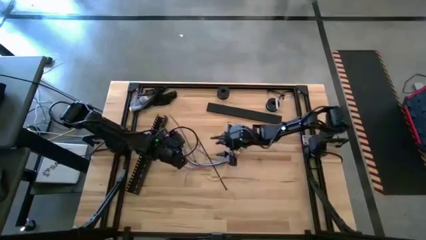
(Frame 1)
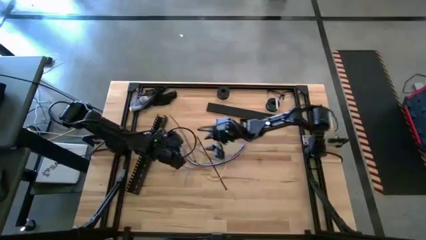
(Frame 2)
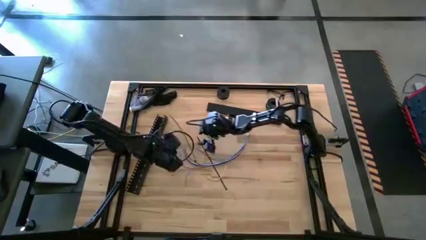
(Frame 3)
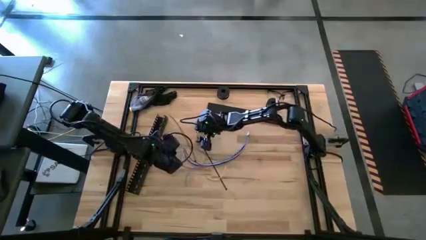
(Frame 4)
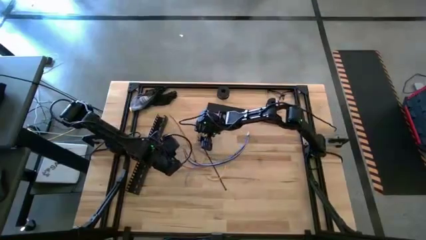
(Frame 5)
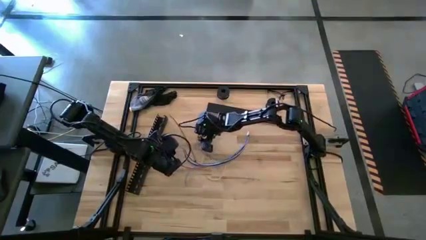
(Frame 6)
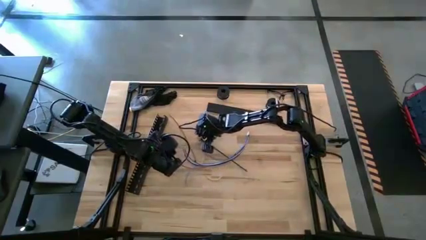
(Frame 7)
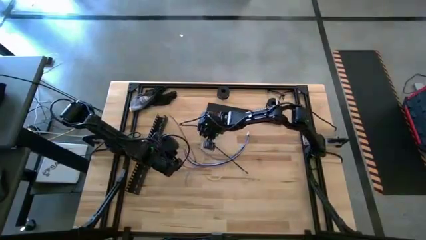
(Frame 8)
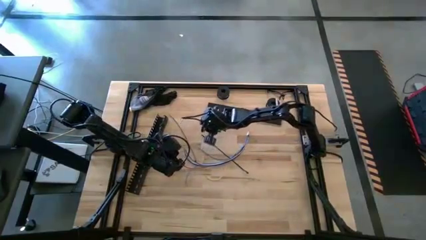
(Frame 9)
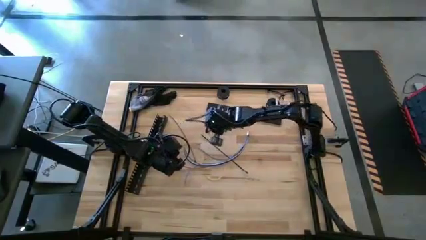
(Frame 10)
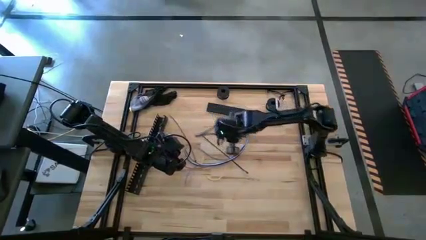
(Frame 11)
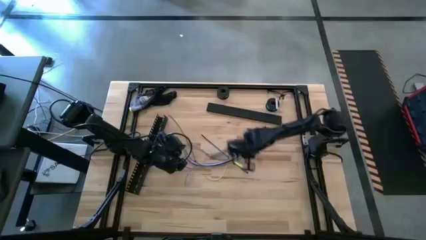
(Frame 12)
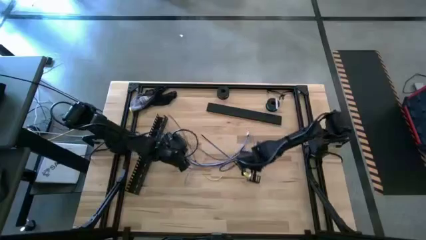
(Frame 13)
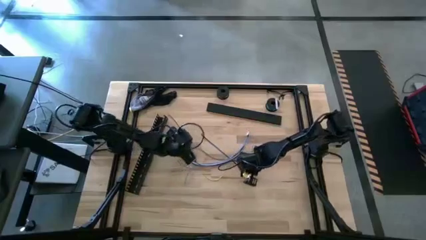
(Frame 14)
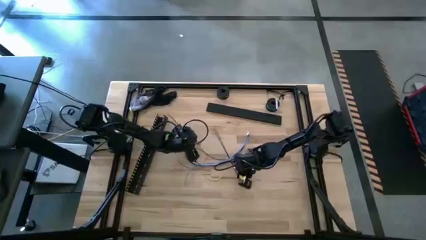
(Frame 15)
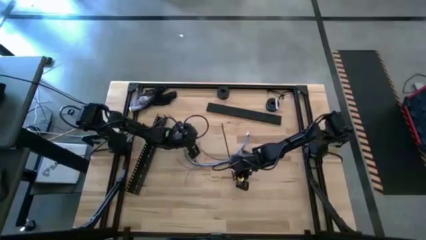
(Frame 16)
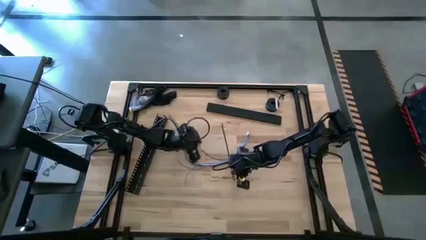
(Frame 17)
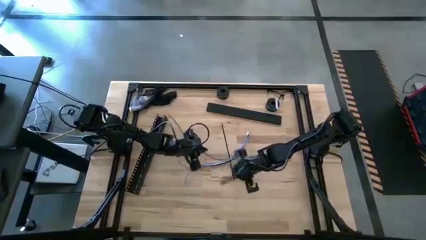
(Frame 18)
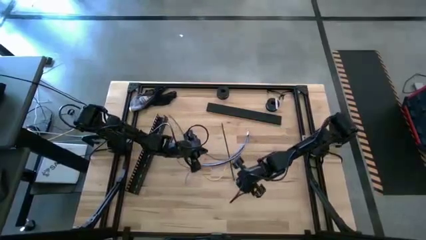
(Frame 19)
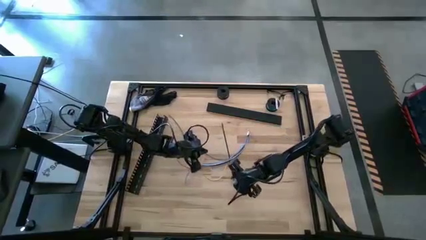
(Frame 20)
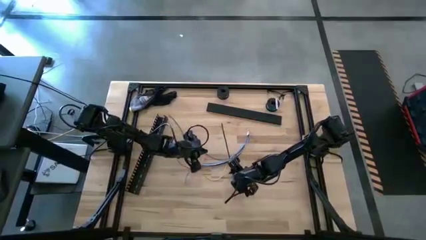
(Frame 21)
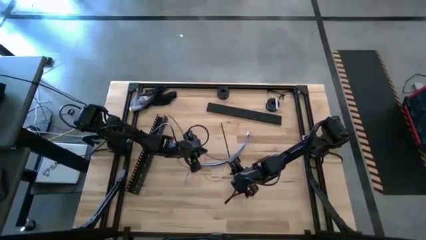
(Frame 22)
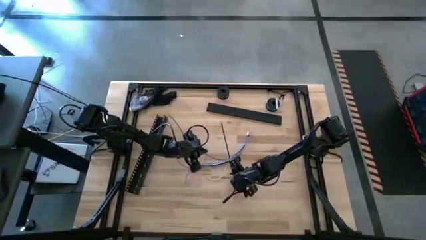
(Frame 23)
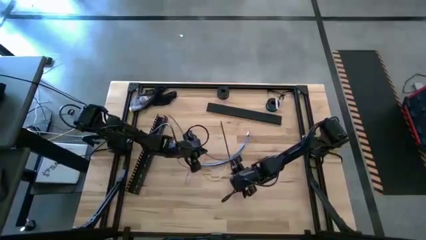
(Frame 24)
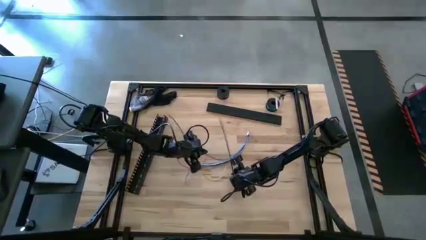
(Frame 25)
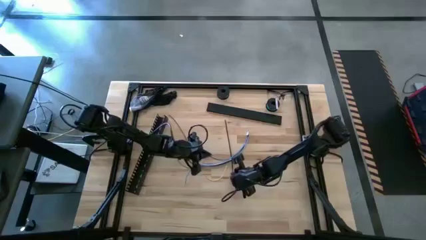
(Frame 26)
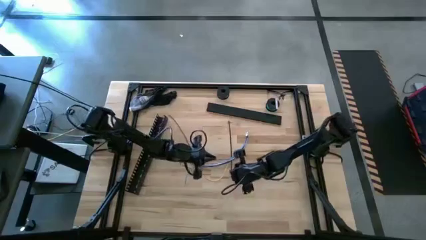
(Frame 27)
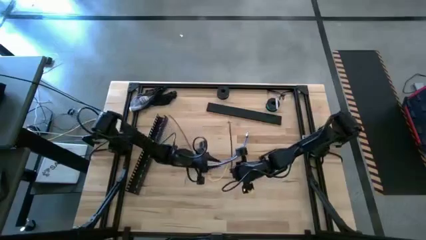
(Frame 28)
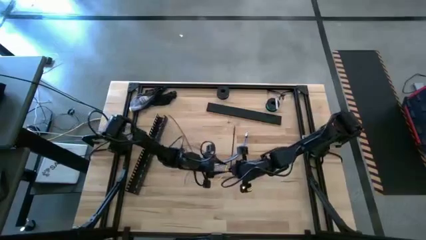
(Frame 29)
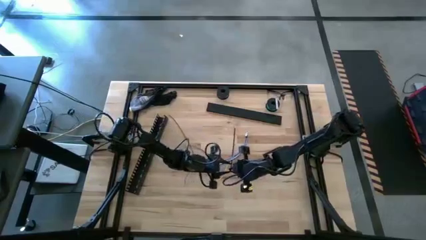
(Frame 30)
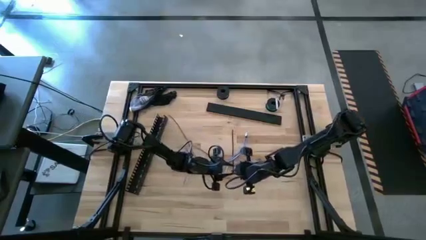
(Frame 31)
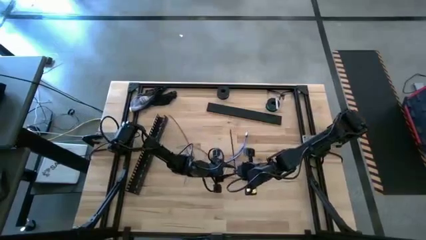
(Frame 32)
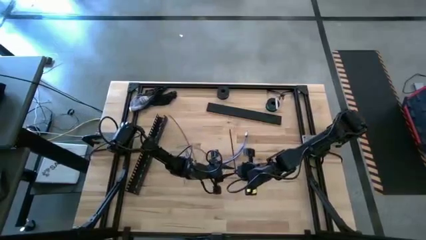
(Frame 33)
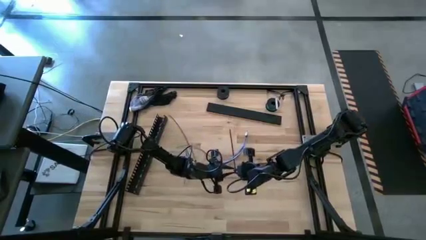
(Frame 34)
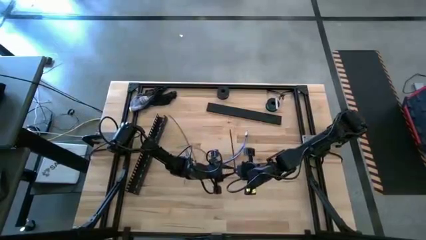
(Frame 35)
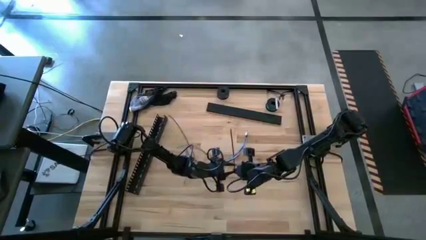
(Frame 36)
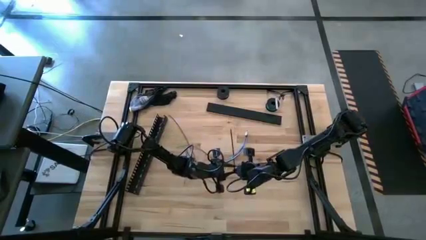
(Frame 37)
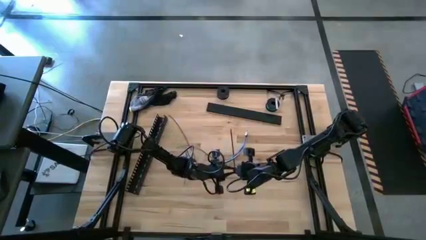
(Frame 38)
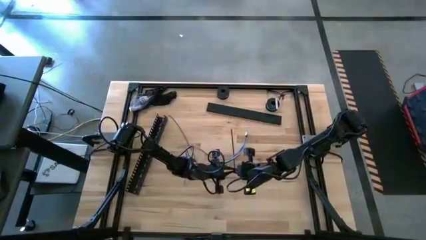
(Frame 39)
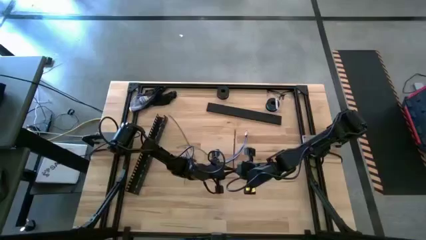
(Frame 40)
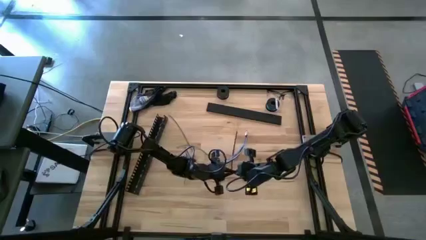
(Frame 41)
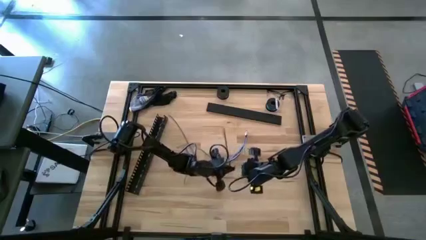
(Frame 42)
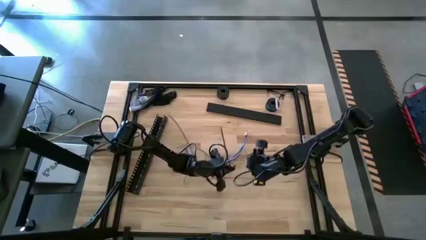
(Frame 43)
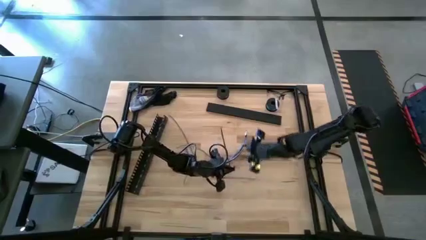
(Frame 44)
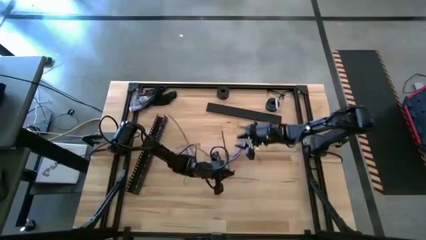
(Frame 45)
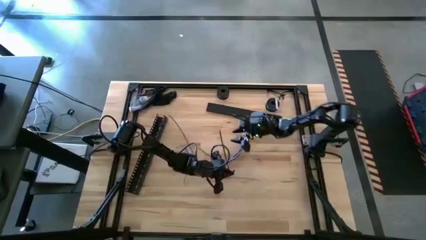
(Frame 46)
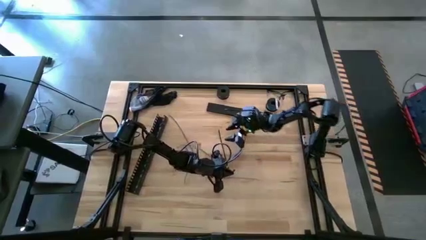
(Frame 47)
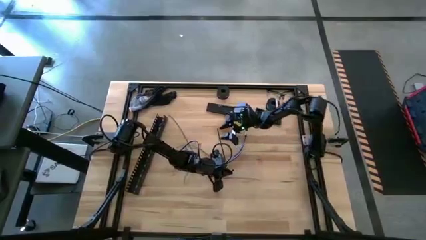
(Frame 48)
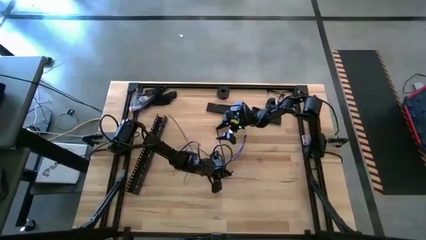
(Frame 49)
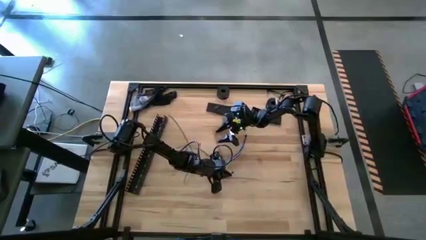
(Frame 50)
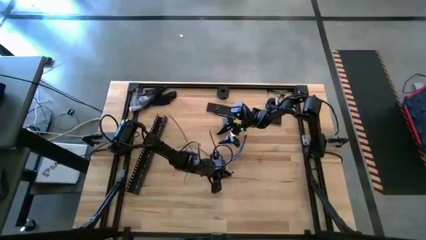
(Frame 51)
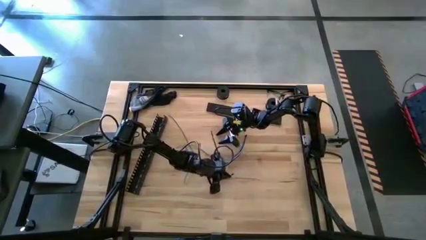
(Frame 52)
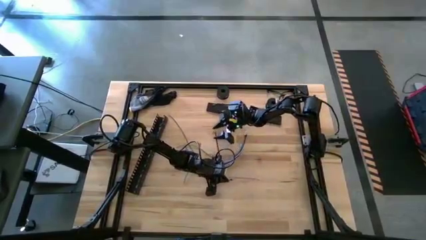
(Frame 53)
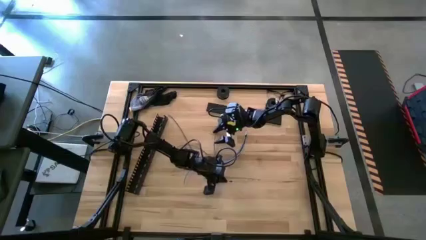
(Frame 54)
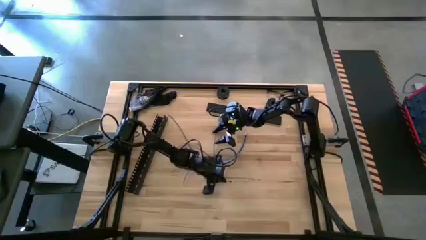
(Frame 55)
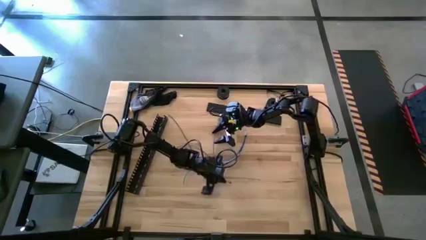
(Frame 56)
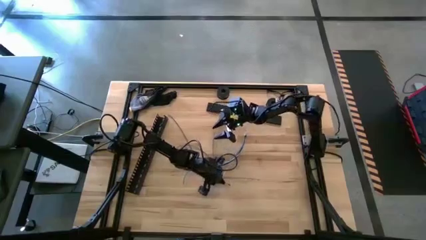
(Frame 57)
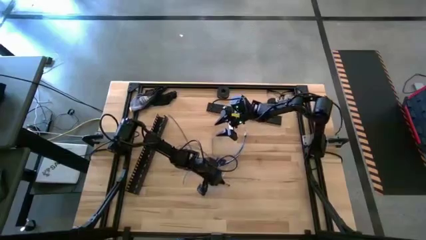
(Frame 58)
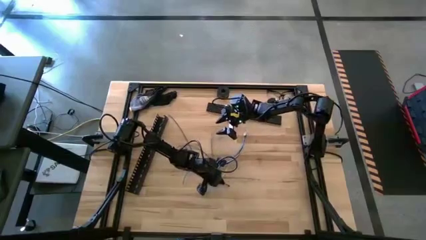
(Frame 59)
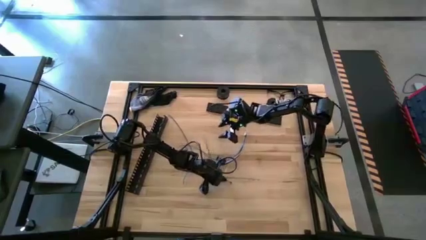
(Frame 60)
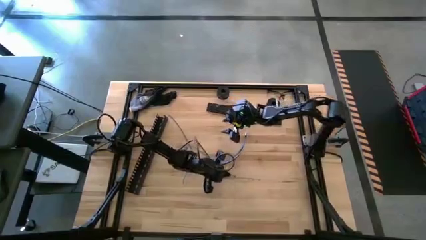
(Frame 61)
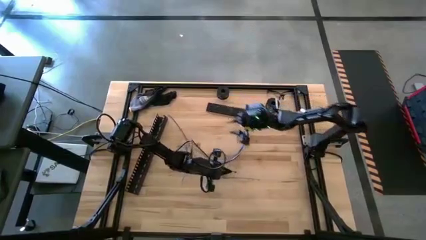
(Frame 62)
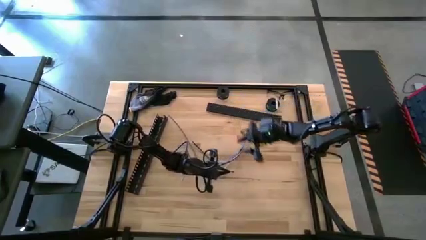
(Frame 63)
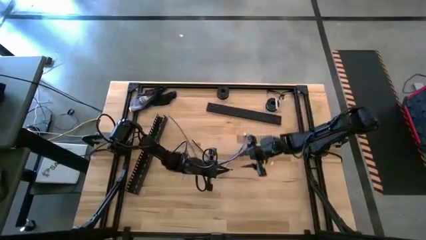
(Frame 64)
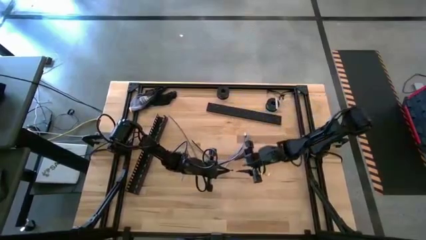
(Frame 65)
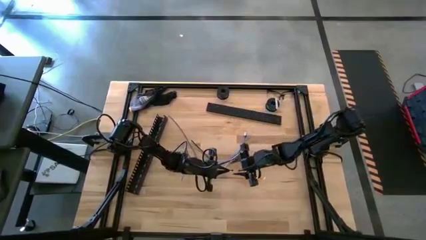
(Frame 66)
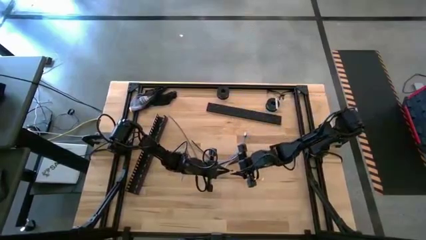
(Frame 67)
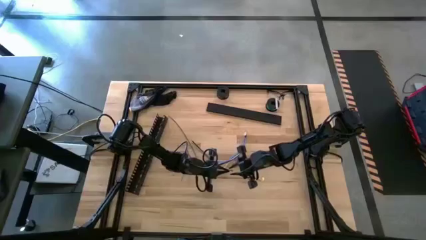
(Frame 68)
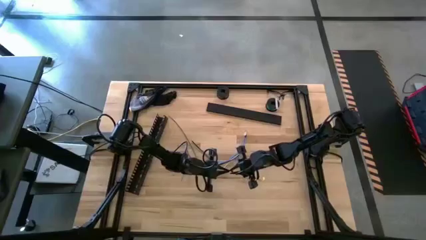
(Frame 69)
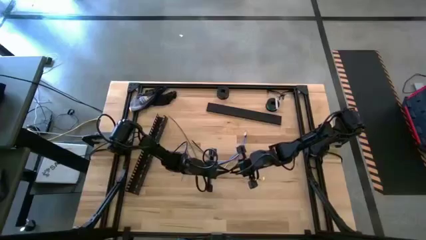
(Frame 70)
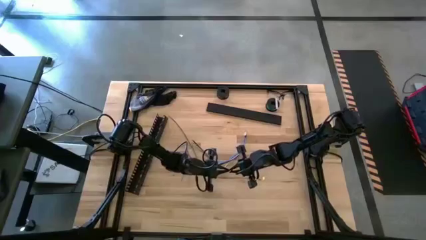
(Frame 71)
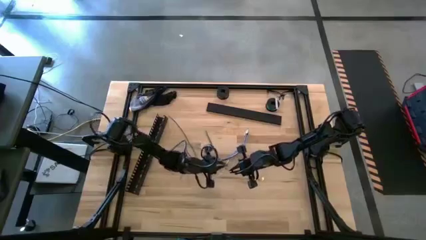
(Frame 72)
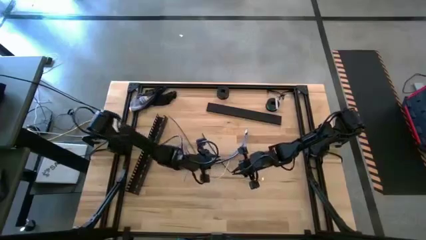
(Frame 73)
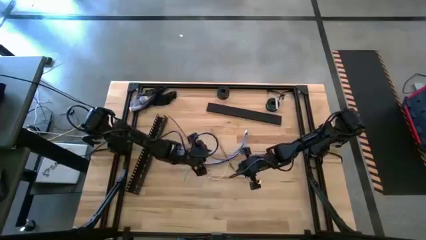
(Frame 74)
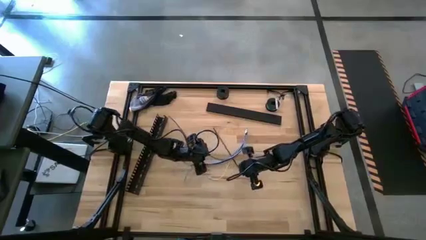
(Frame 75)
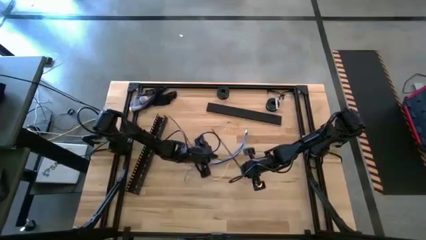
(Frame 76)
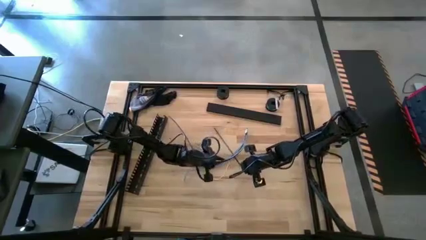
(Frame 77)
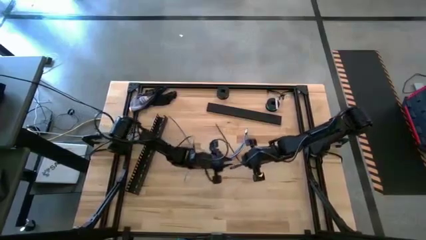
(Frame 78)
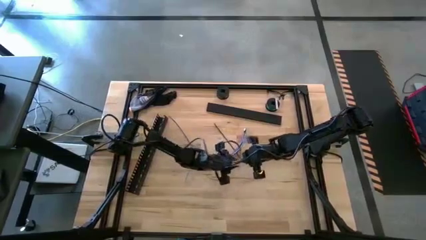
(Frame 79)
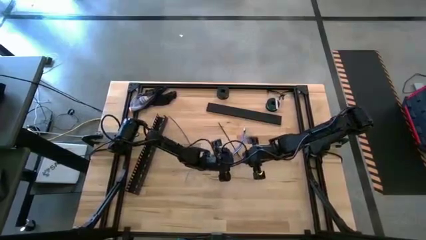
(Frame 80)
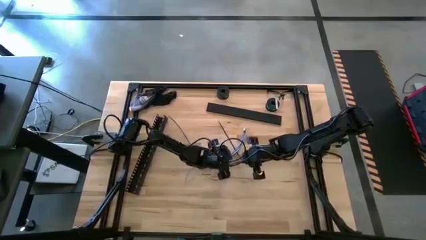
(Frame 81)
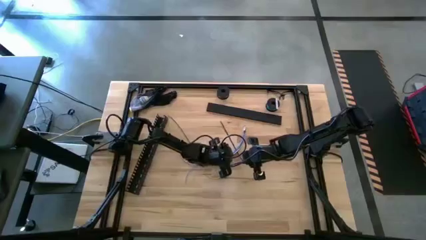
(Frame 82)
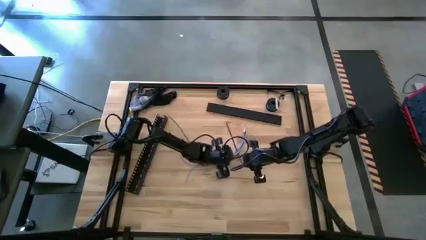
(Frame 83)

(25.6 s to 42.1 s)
Task: Ziptie cables
Insert the right cable zip tie into the cable wires
